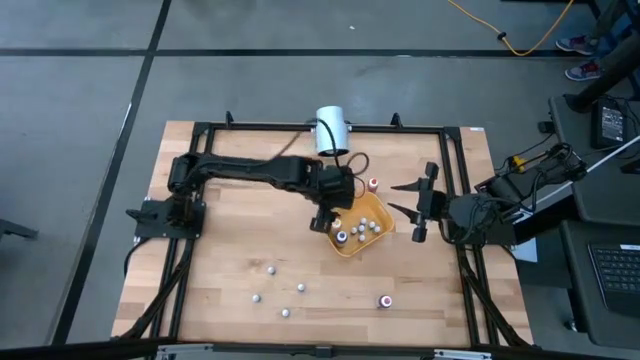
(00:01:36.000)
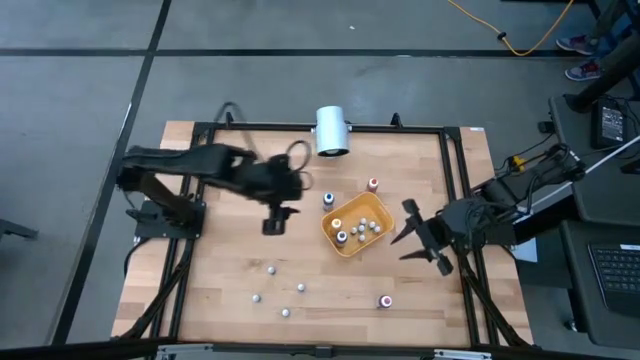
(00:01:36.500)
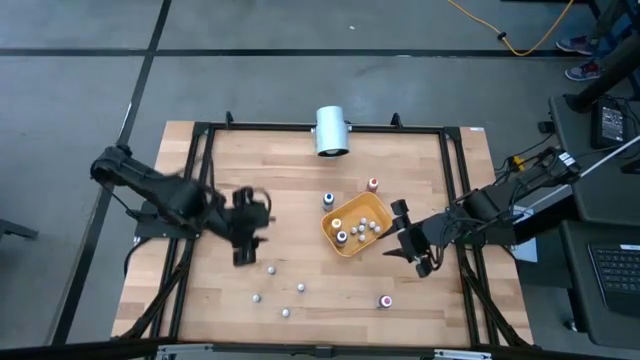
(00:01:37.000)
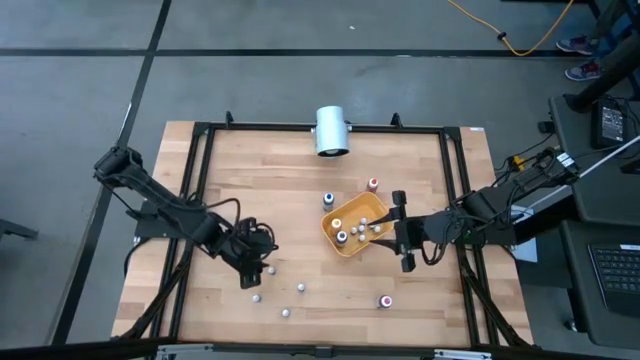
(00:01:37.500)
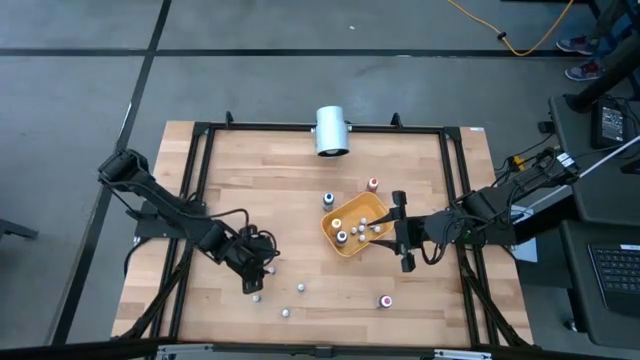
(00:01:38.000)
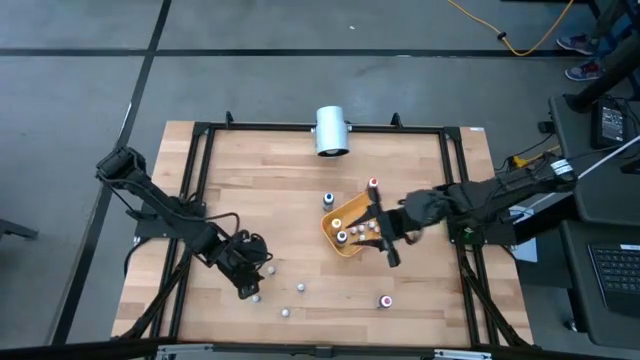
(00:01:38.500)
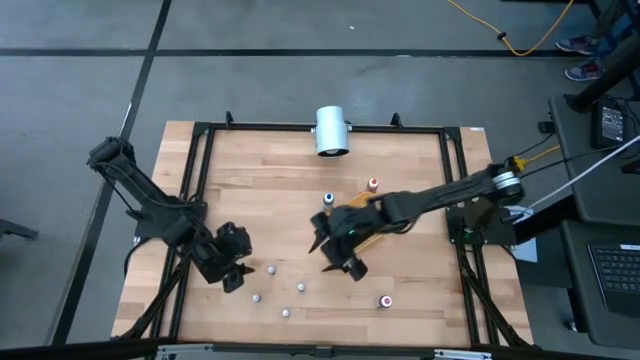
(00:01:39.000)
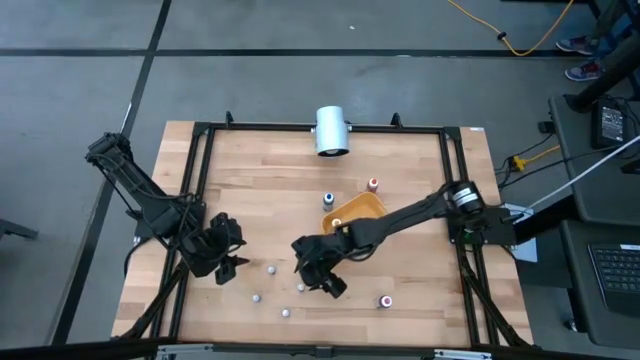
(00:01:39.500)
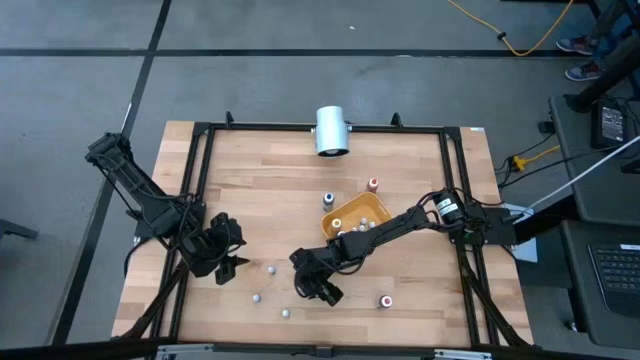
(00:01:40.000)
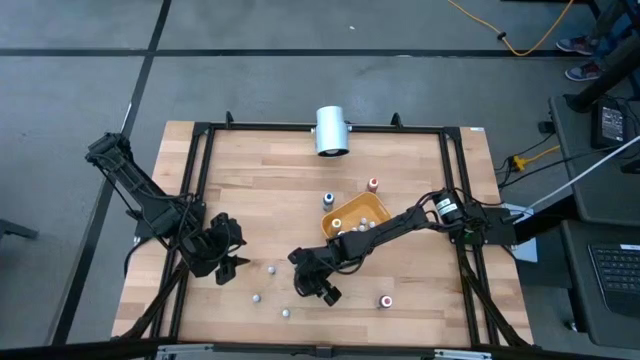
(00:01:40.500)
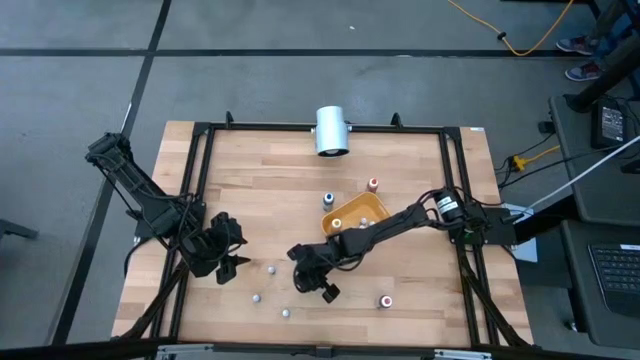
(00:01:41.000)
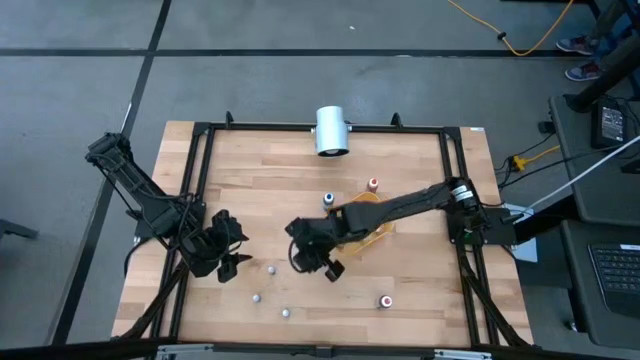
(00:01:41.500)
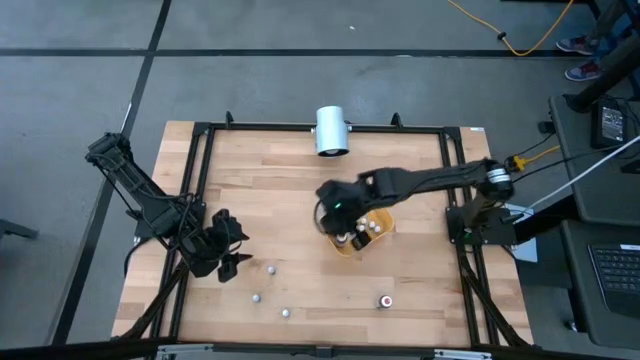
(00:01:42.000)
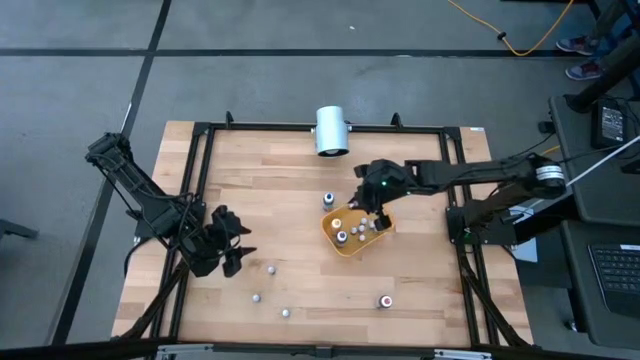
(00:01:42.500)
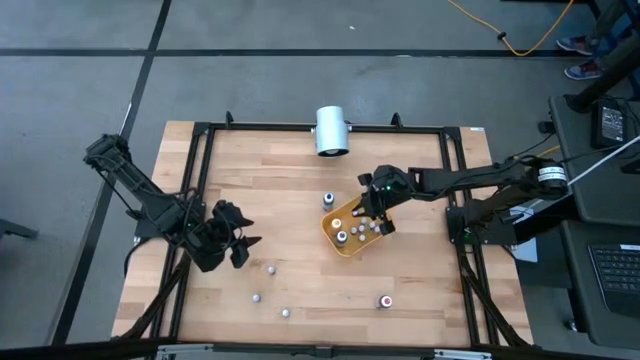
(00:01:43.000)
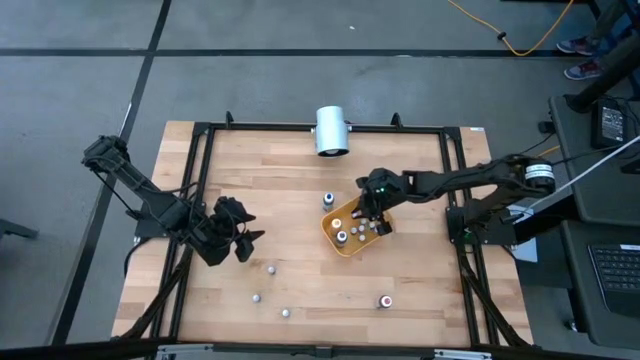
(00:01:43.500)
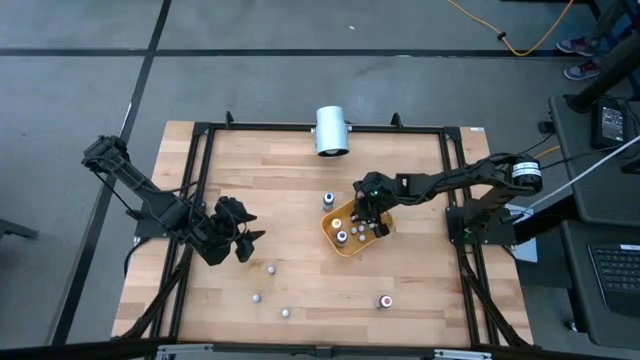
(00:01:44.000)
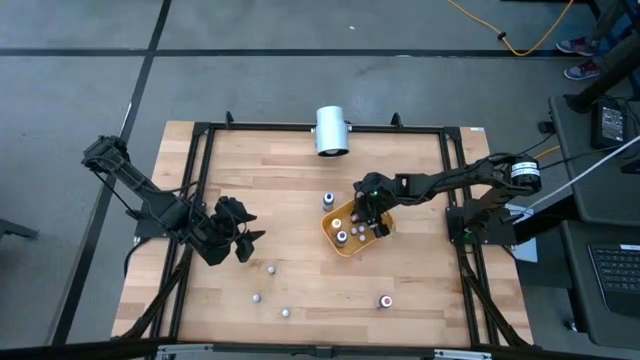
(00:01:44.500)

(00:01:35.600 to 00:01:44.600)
Task: Pick & Place food coloring
Put the small green food coloring bottle into the yellow bin

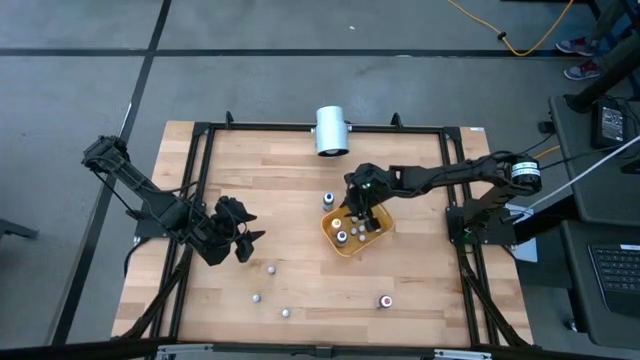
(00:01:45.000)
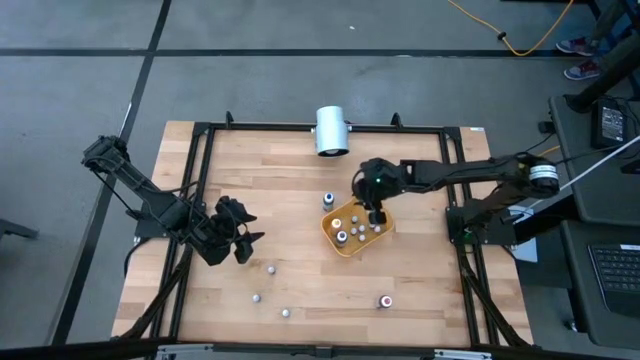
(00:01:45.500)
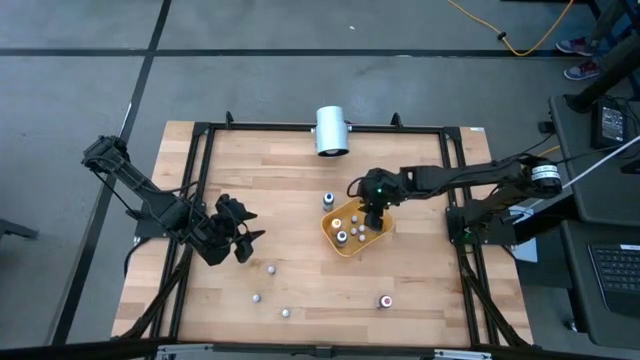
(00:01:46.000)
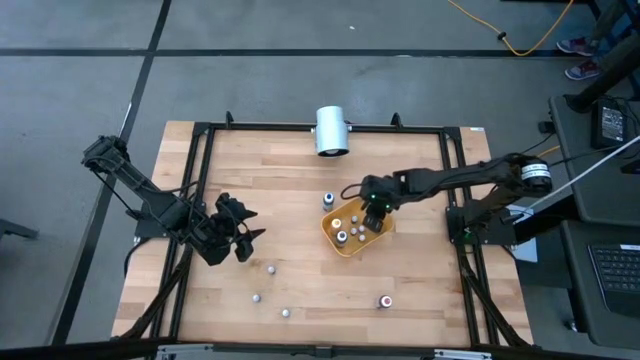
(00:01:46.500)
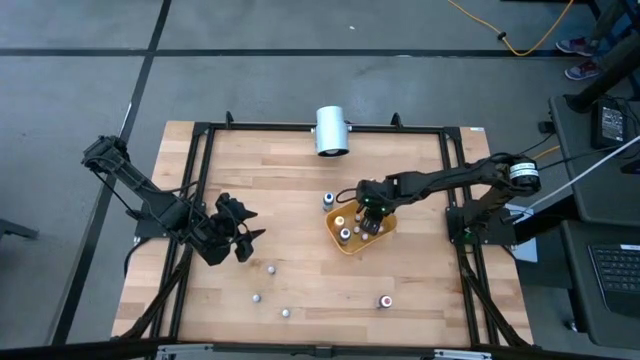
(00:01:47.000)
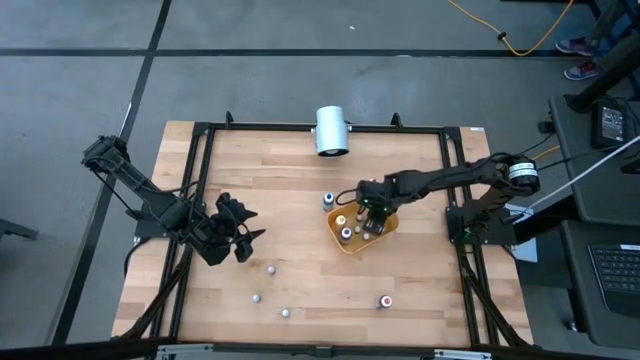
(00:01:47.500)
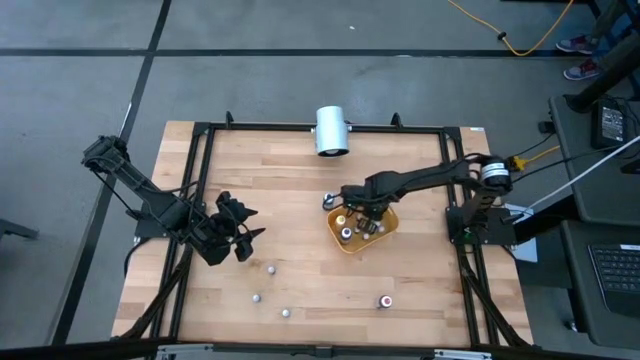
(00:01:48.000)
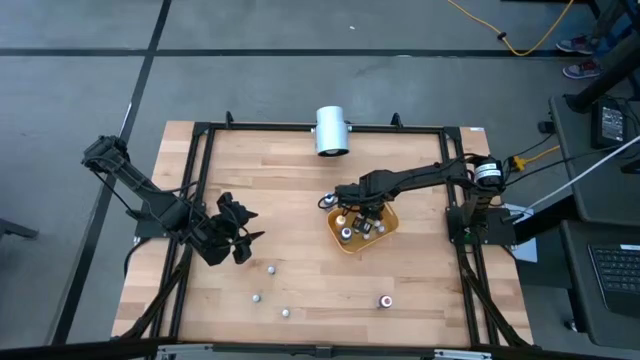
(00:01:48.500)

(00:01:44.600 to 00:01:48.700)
Adjust the red food coloring bottle in the yellow bin

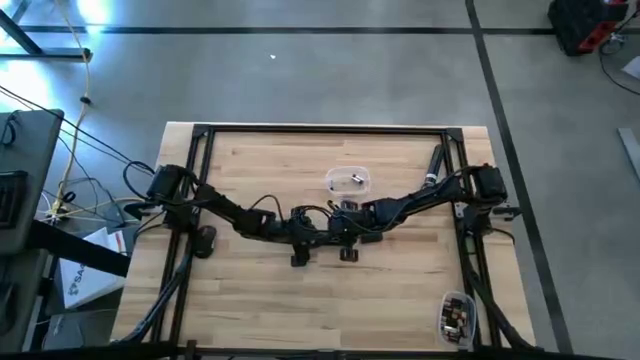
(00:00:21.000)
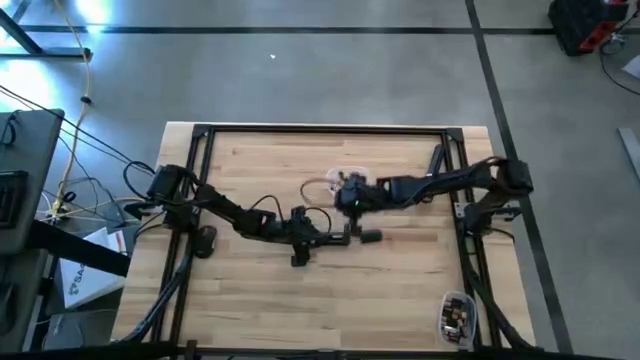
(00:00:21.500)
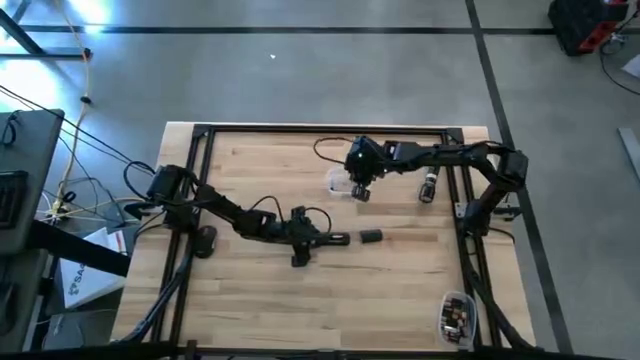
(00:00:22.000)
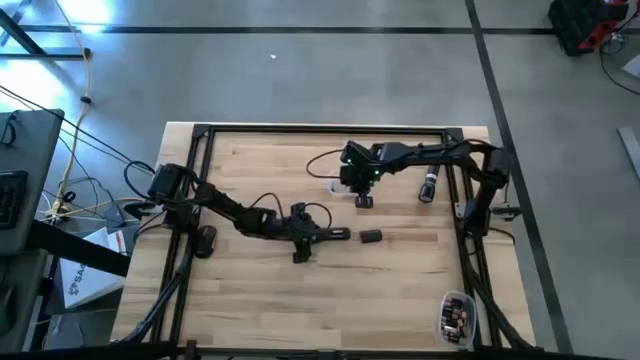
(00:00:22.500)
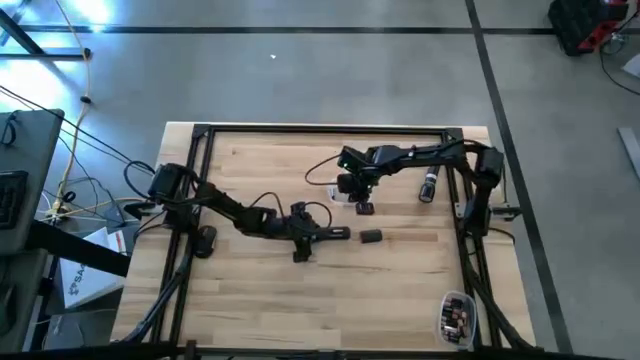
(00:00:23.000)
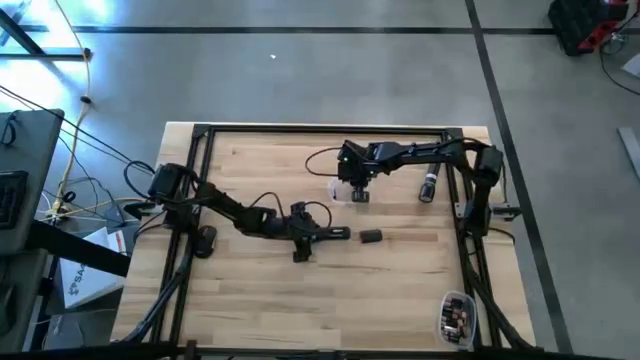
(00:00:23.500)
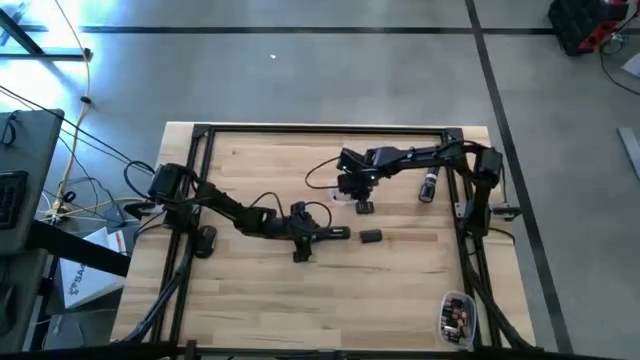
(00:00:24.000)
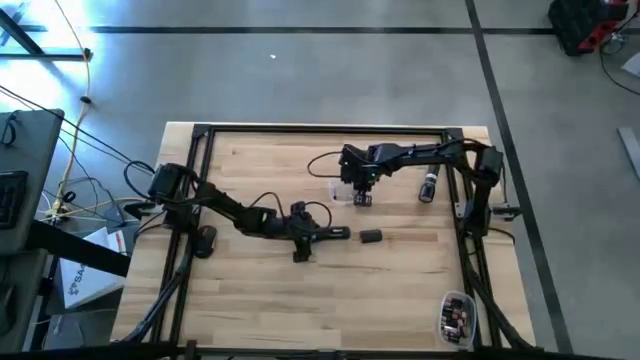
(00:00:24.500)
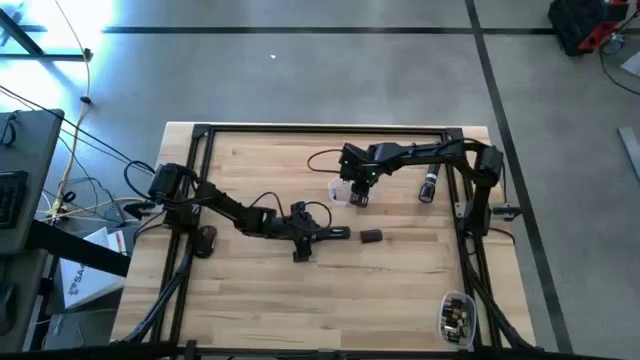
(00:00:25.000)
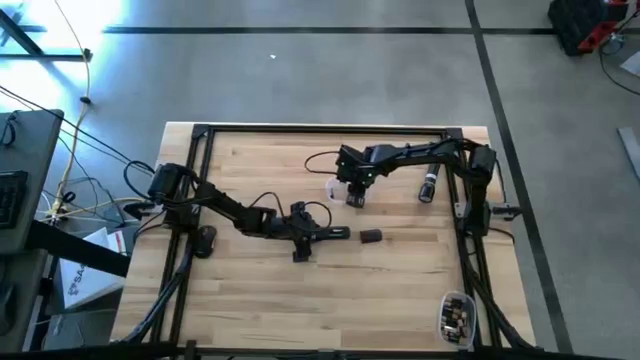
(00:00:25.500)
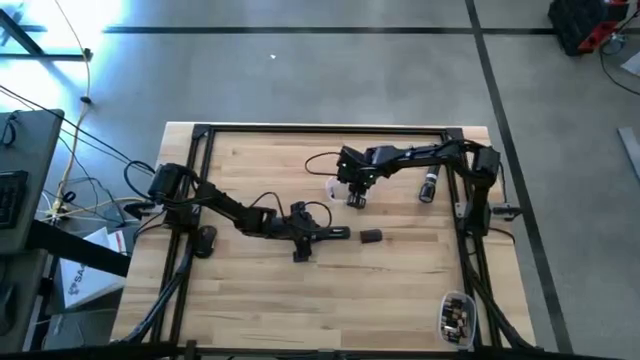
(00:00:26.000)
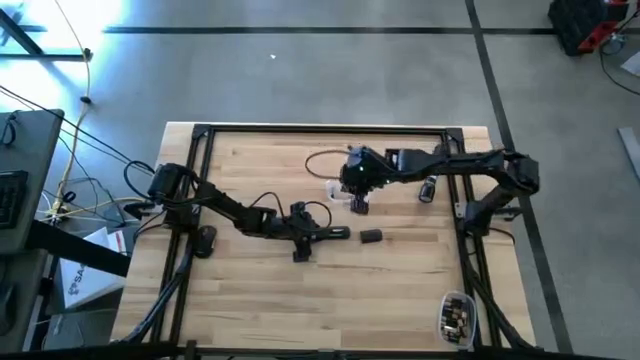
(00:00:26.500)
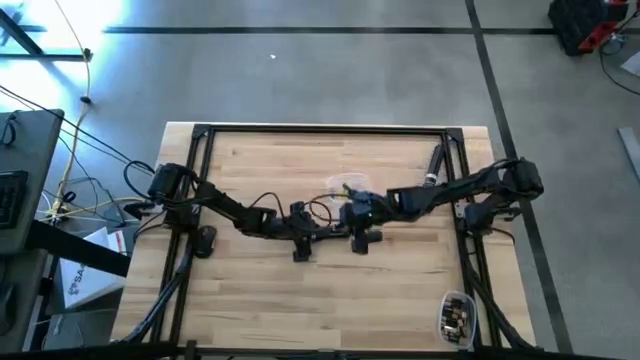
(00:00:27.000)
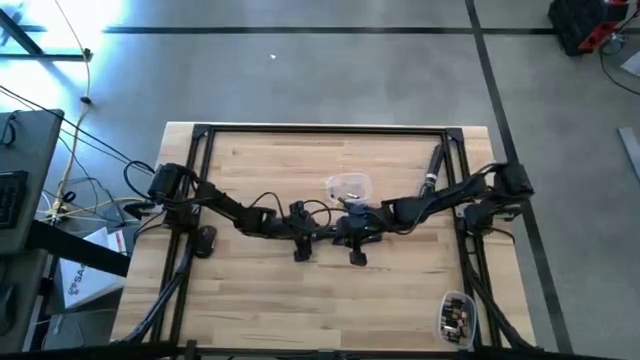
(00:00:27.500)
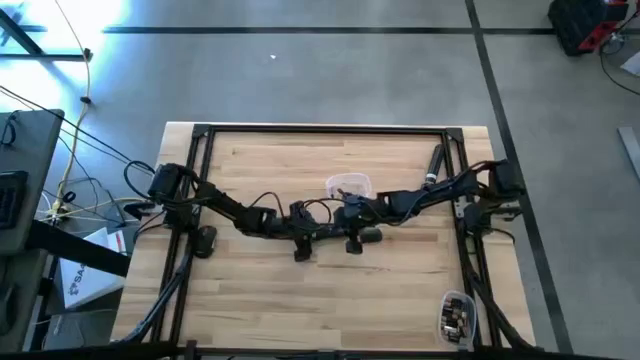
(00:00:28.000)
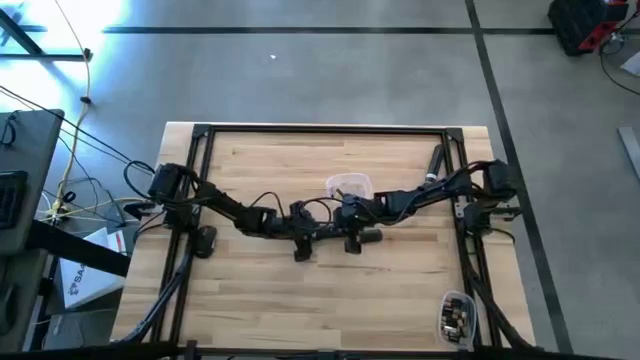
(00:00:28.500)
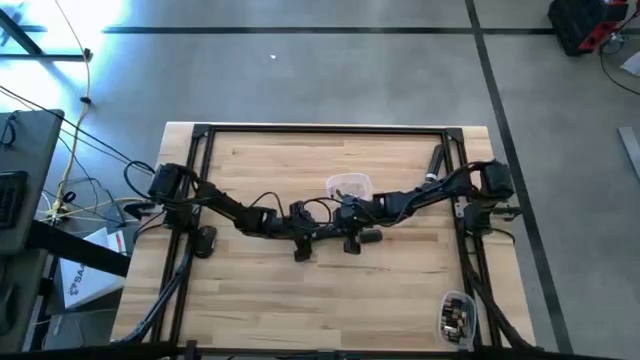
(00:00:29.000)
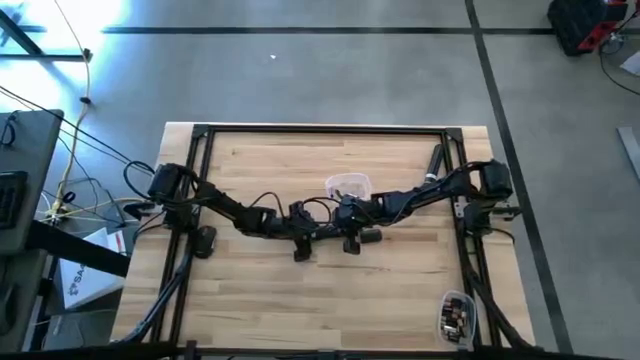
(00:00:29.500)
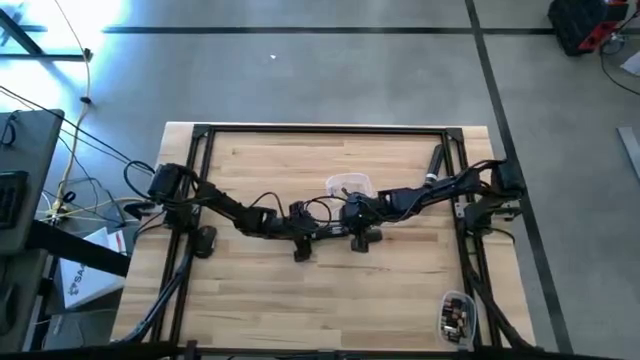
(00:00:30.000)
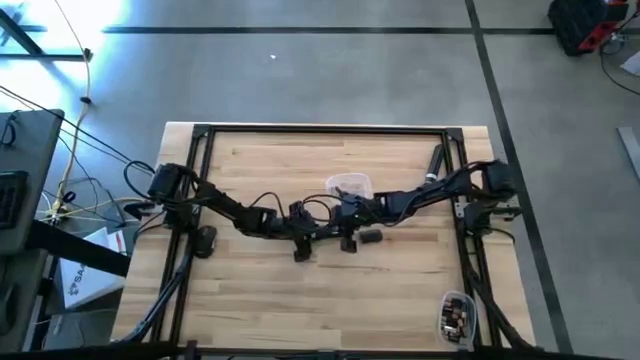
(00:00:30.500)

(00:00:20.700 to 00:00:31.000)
Task: Insert battery
Insert the silver battery into the remote
